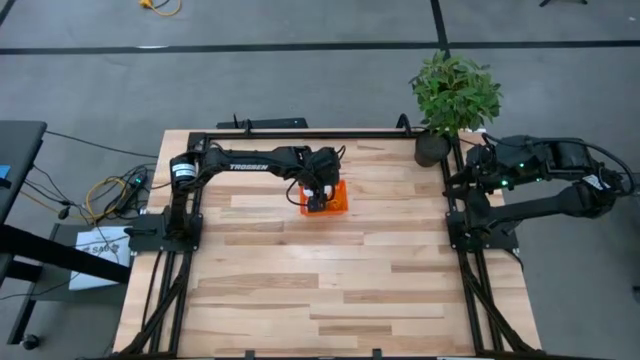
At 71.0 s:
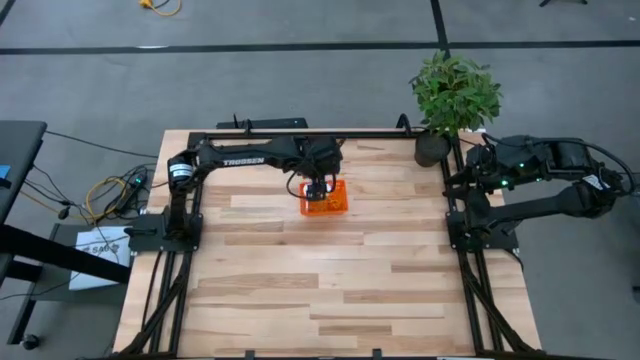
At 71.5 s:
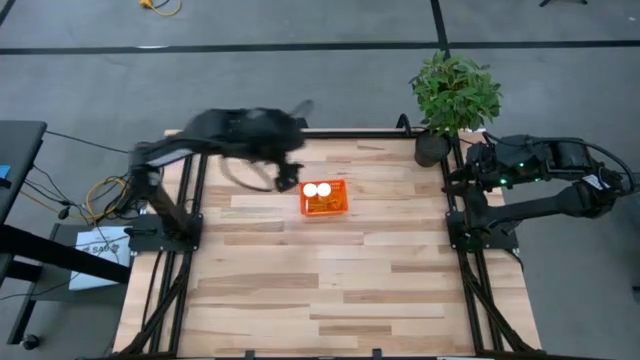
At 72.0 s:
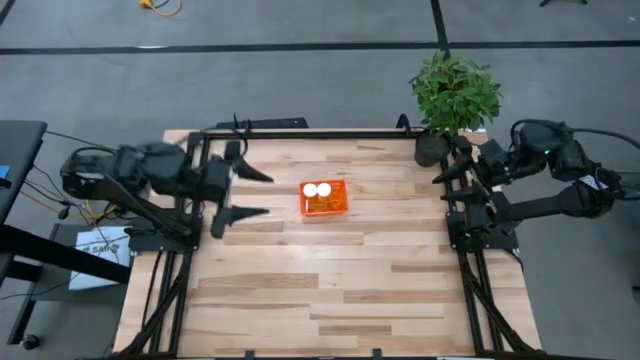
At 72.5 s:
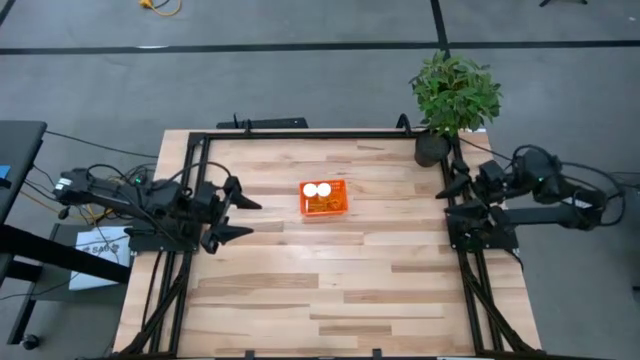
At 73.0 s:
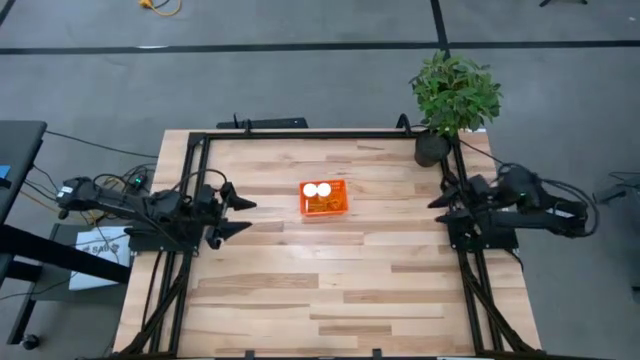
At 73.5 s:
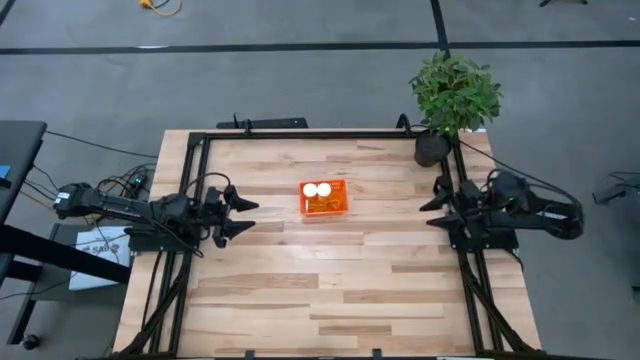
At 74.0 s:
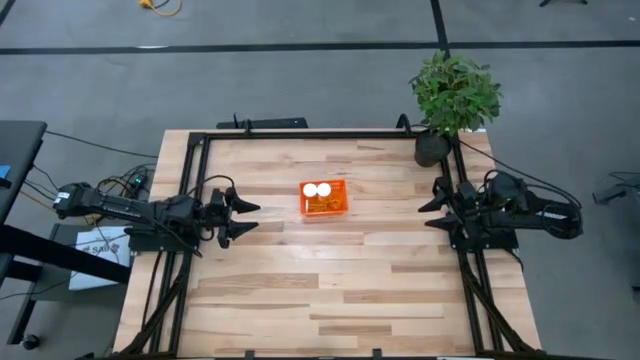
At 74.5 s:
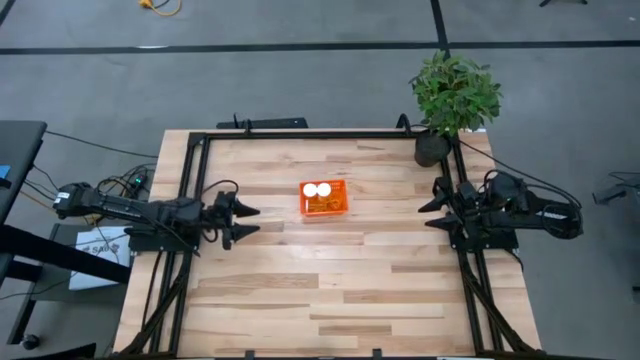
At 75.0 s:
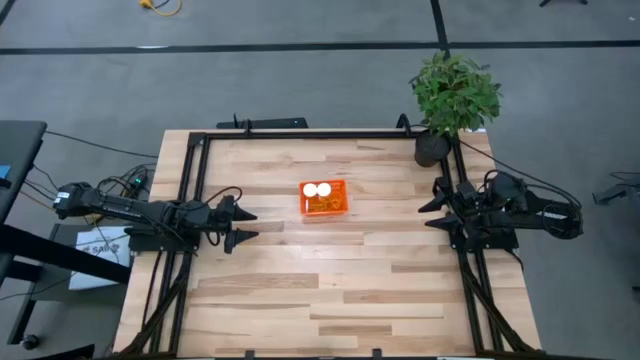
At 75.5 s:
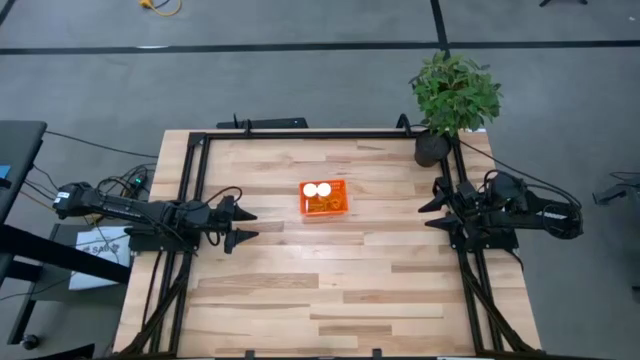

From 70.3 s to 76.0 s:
Task: Pick and place pill bottles into a basket
Return to Home Position

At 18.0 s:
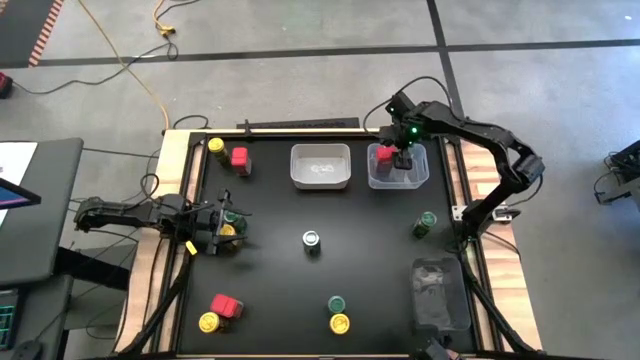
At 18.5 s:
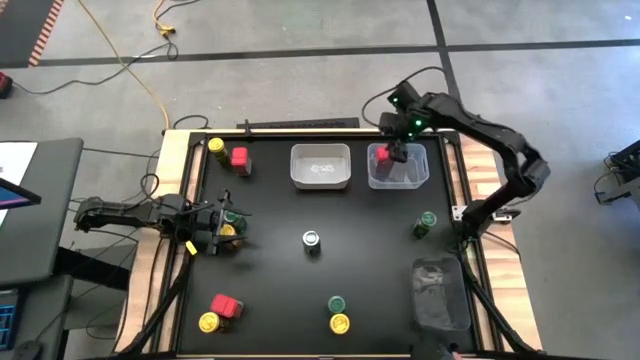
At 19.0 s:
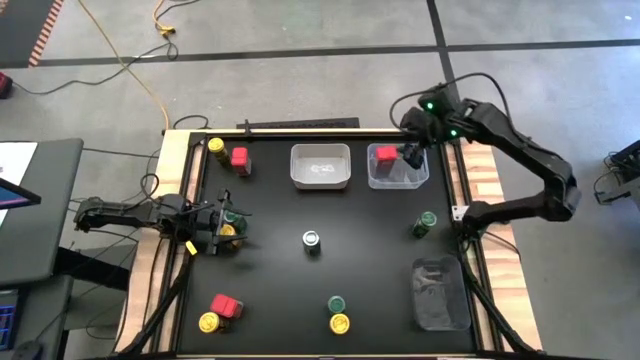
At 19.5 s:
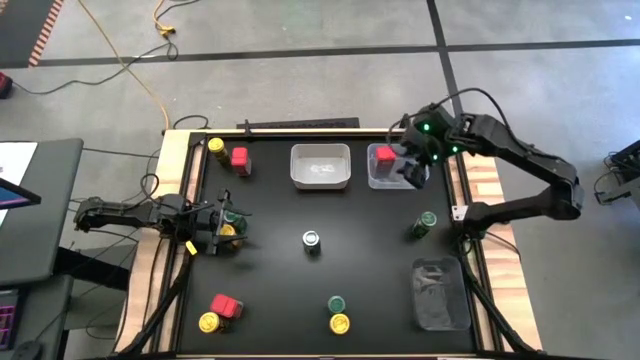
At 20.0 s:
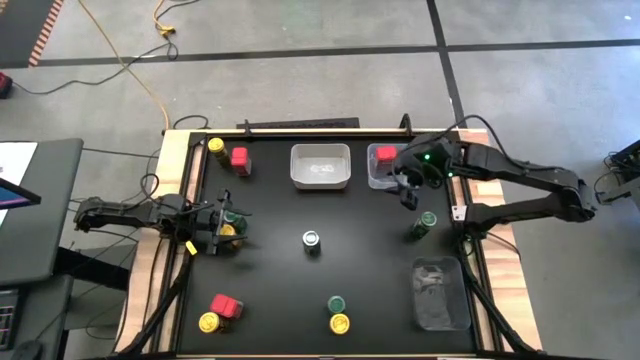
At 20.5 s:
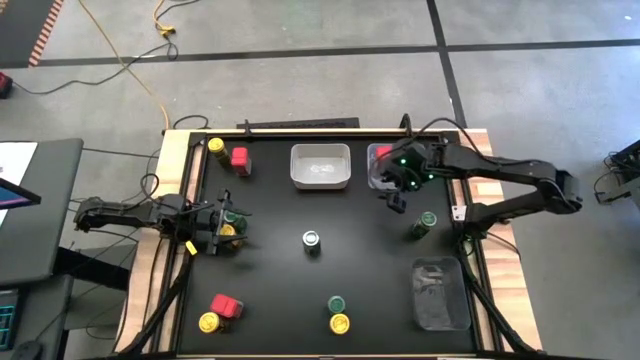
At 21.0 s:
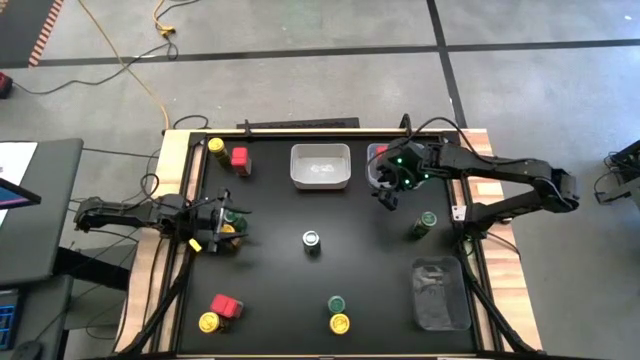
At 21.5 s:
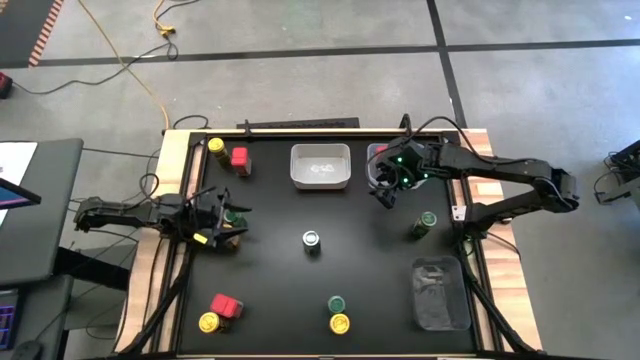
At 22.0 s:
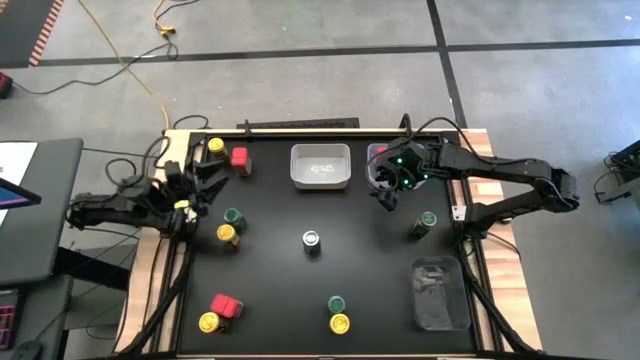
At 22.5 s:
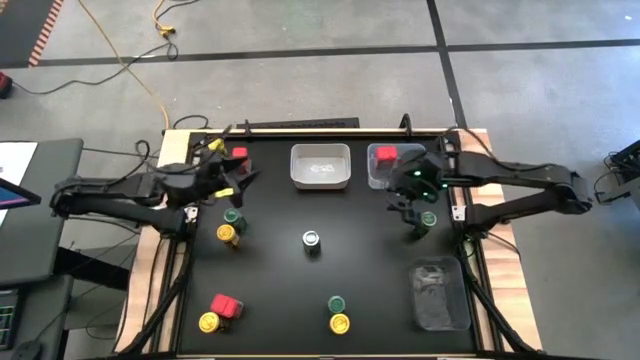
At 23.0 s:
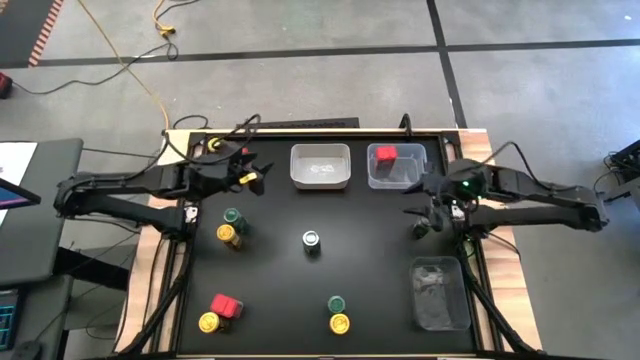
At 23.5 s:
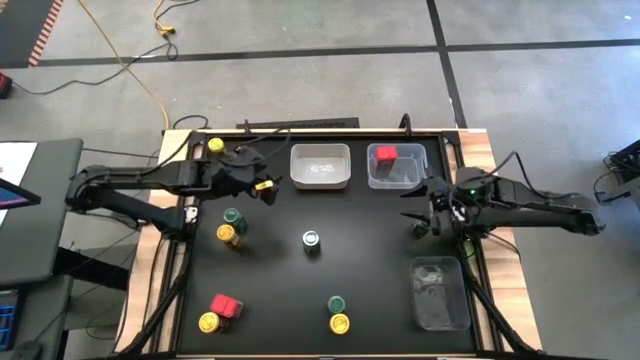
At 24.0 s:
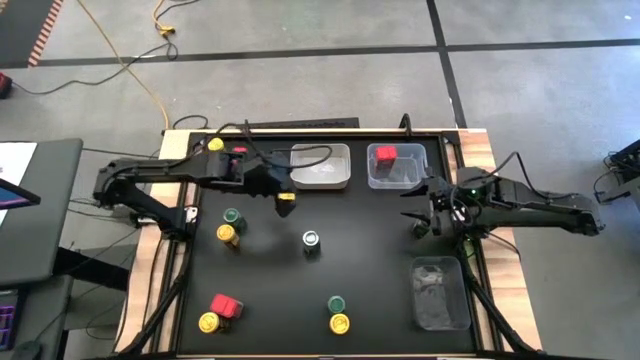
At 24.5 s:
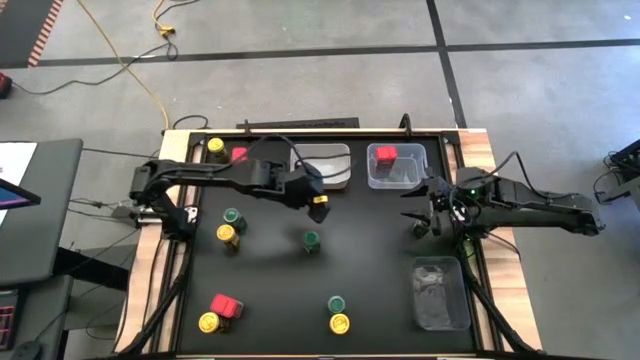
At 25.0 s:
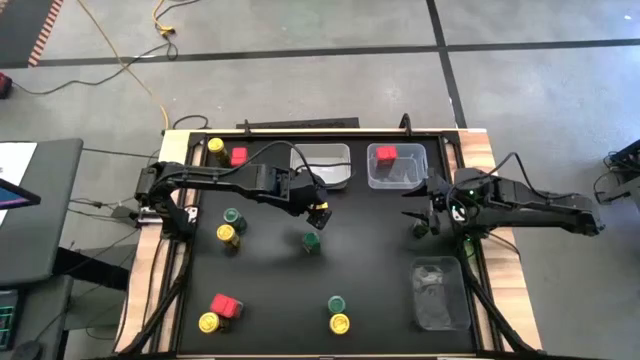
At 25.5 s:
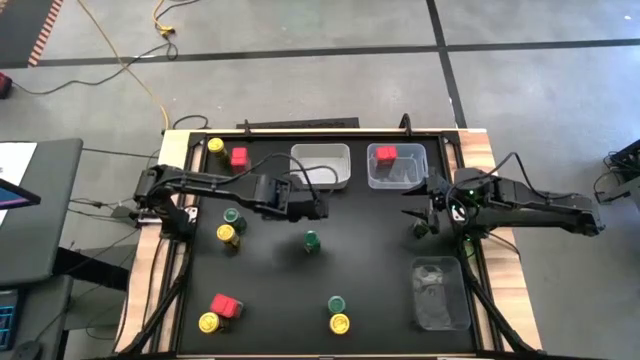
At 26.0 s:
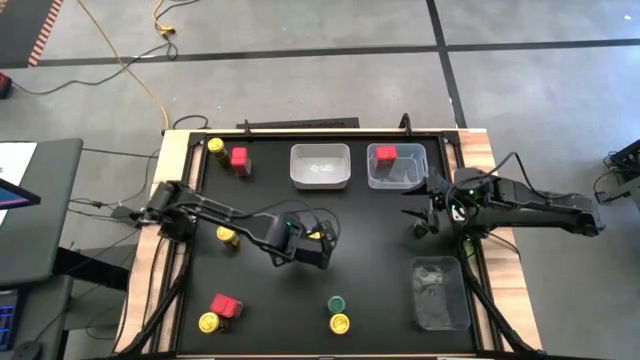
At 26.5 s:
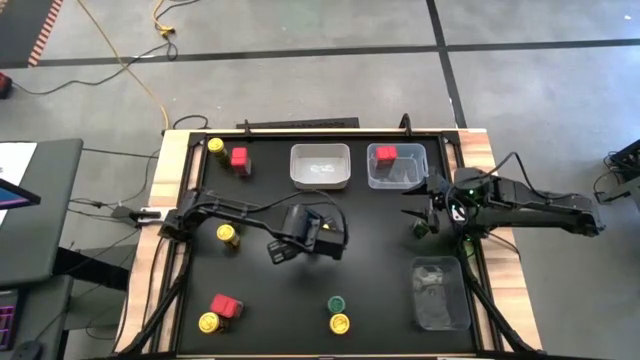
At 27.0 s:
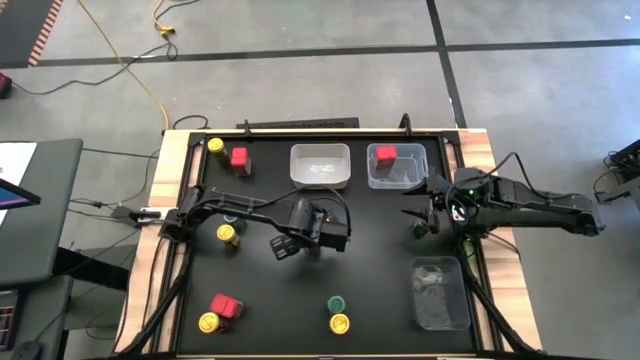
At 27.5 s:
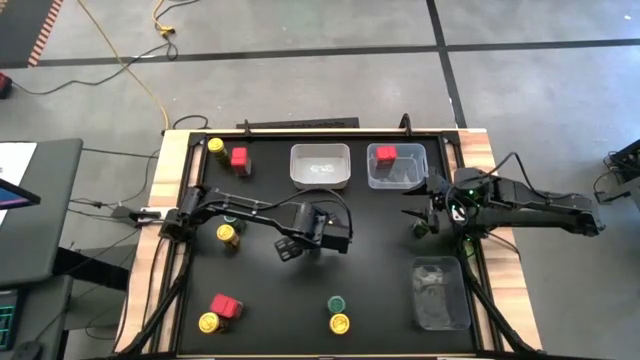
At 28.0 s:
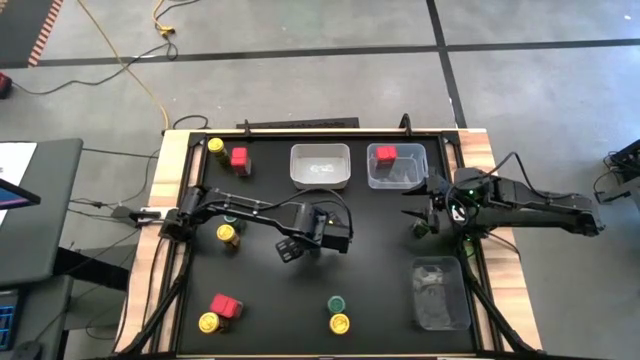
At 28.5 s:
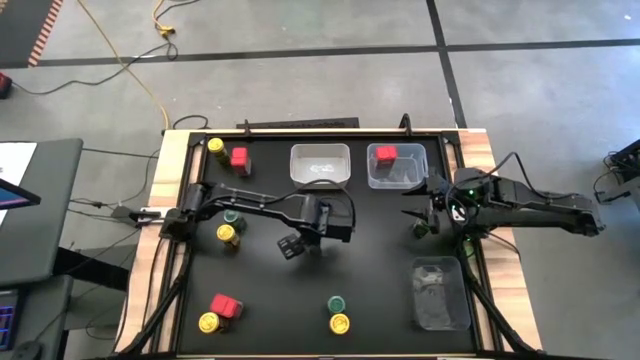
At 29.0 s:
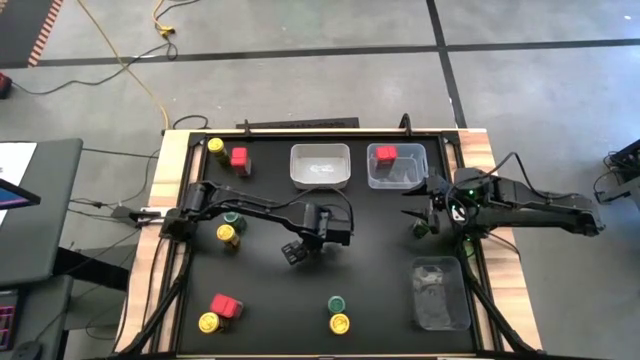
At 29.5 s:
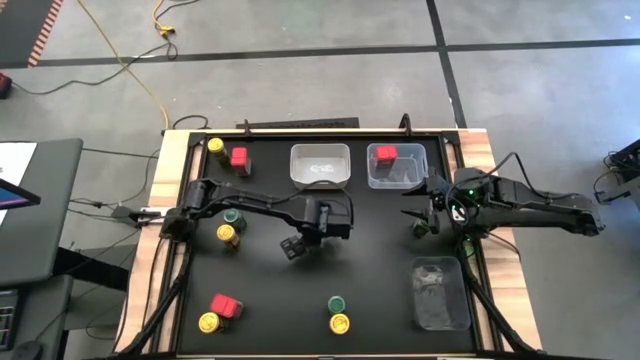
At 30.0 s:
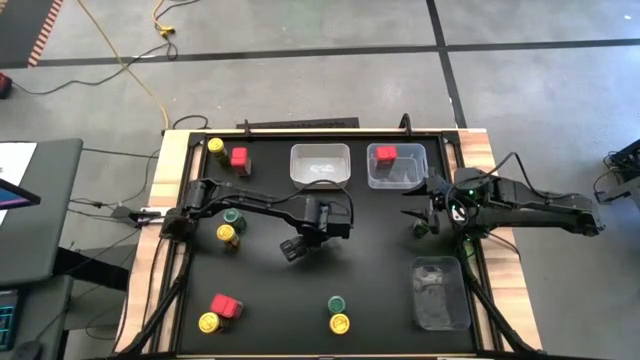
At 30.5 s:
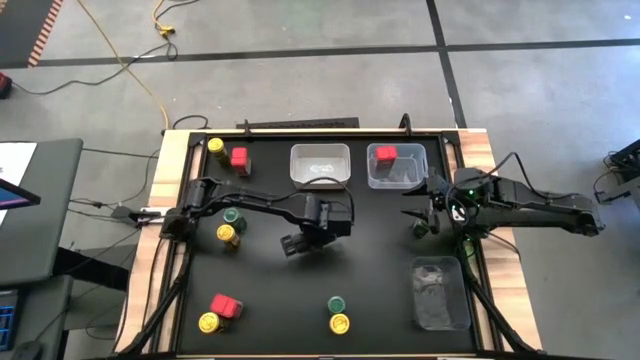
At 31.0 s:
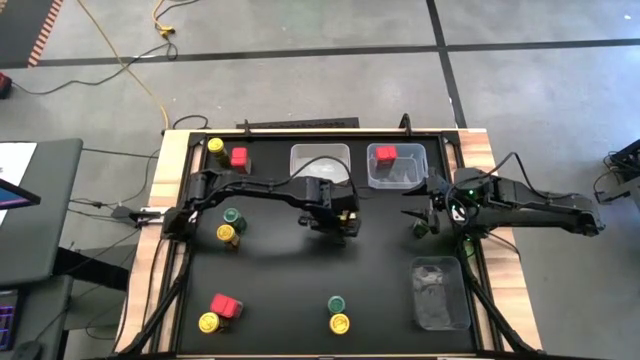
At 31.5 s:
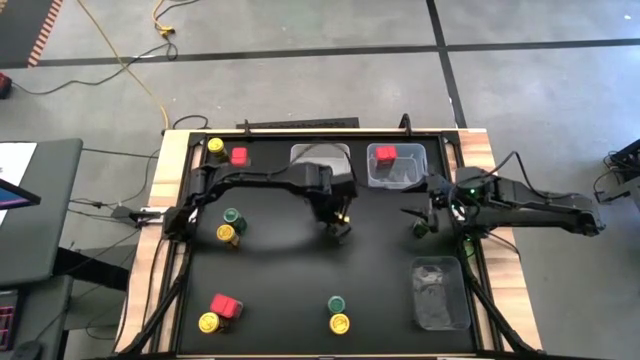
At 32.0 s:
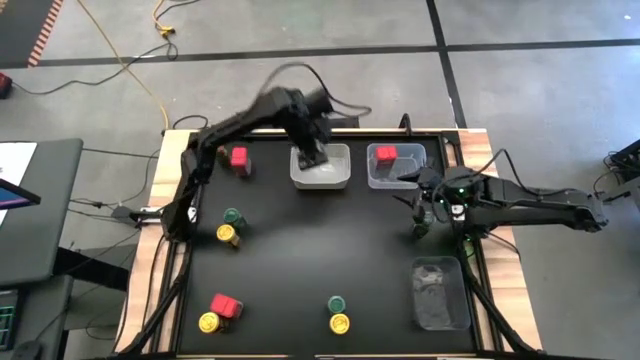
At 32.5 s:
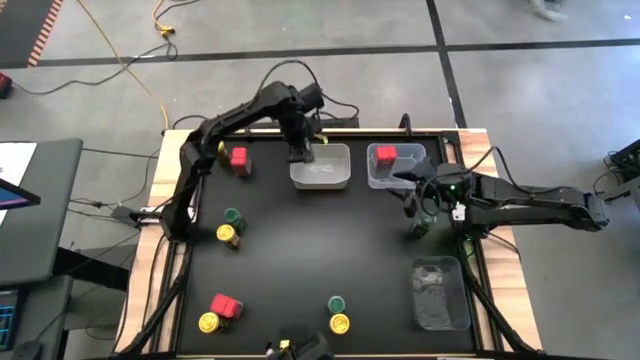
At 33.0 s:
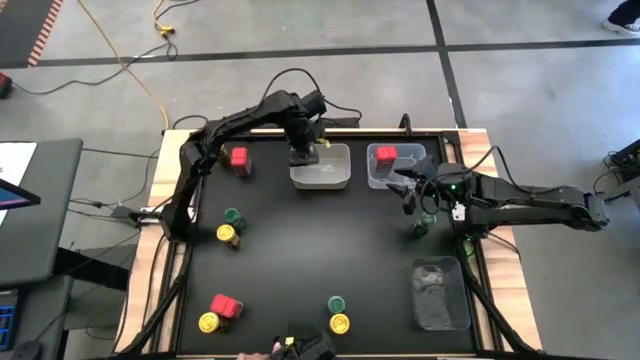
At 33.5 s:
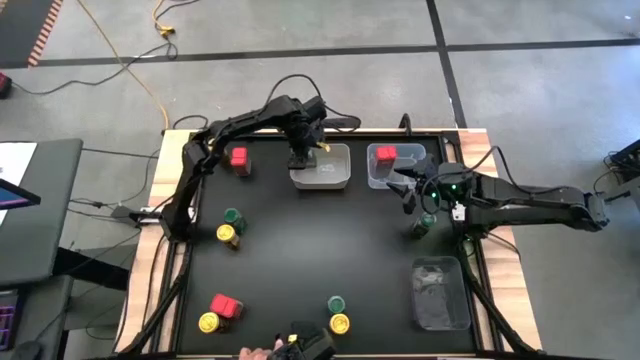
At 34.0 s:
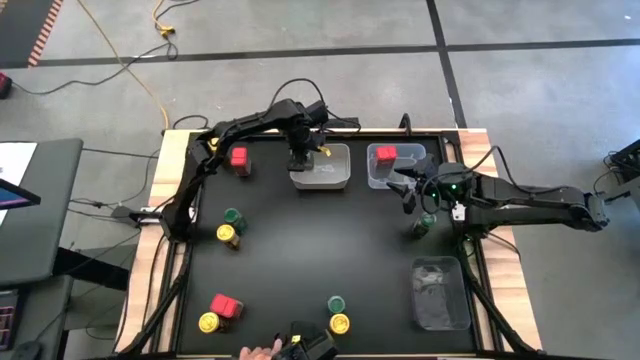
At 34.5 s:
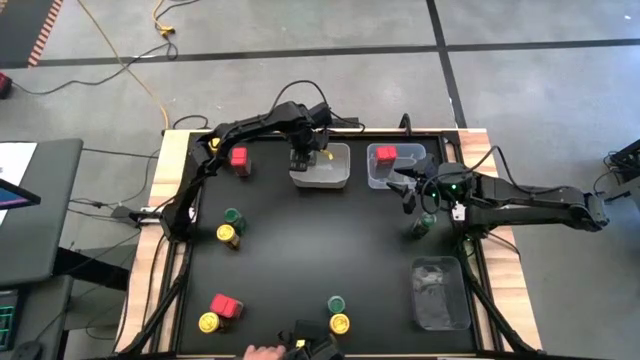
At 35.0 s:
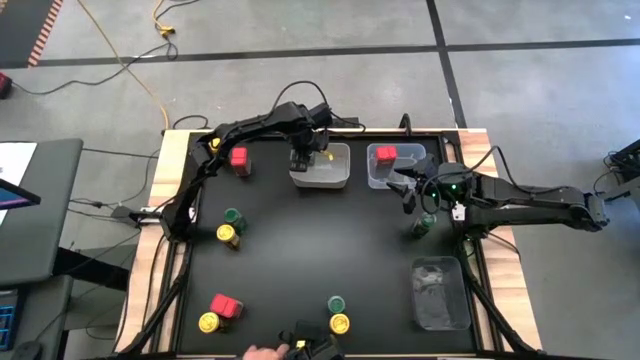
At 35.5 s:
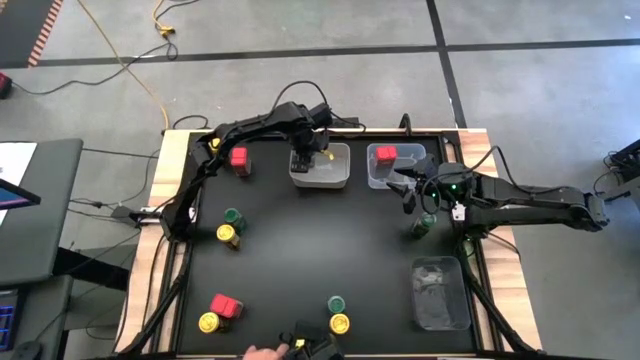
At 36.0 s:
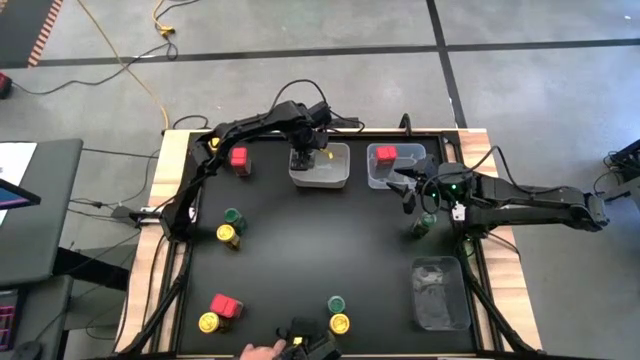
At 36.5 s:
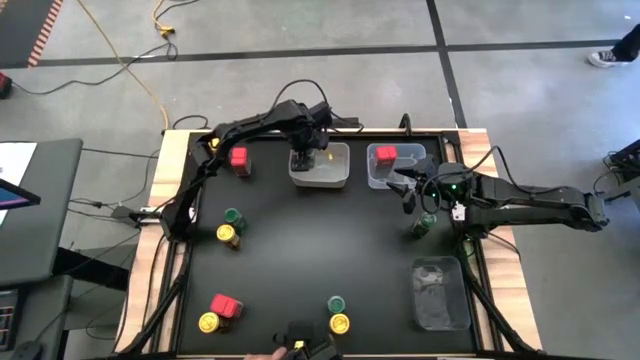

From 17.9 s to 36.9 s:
Task: Sort spices by type
Put the middle green seasoning bottle into the white bin
